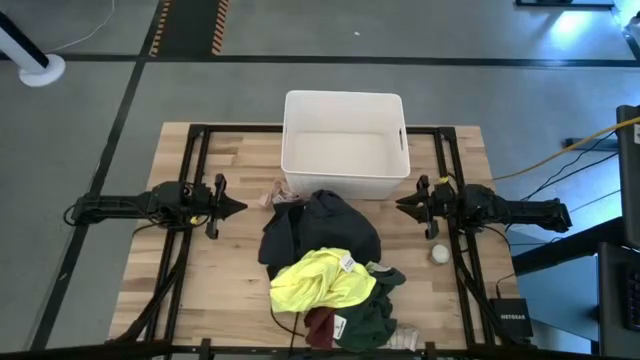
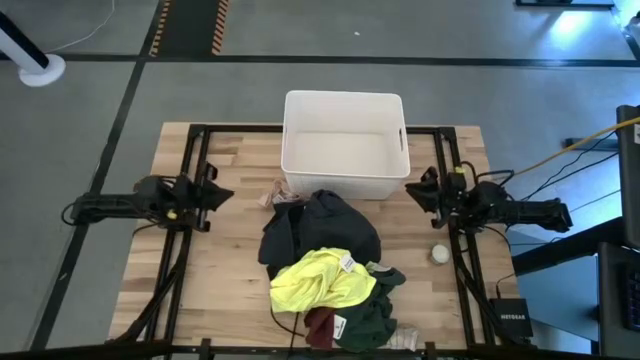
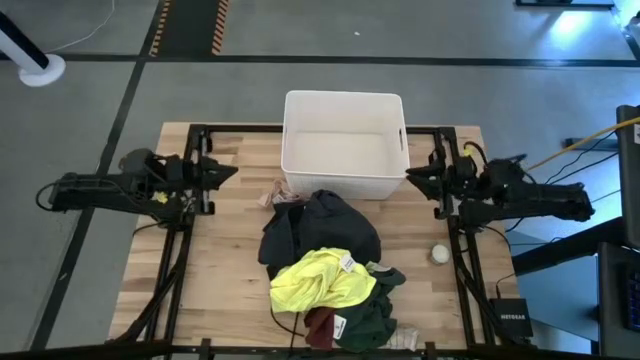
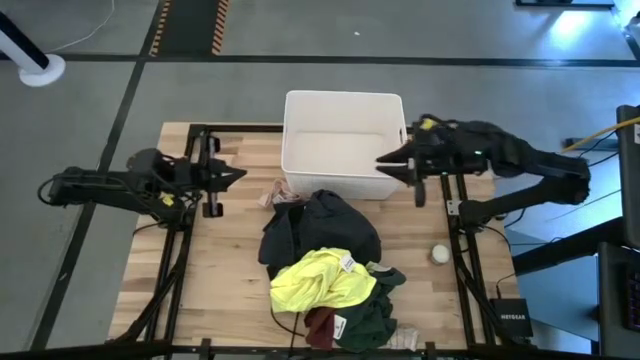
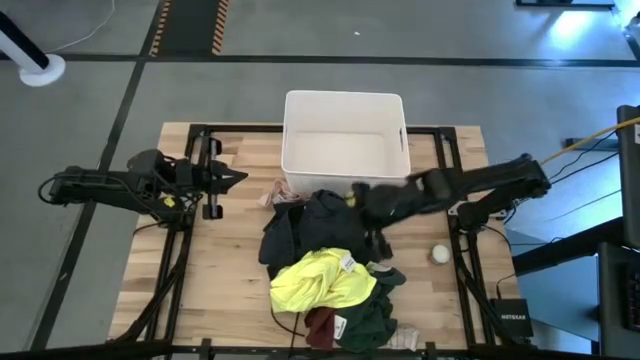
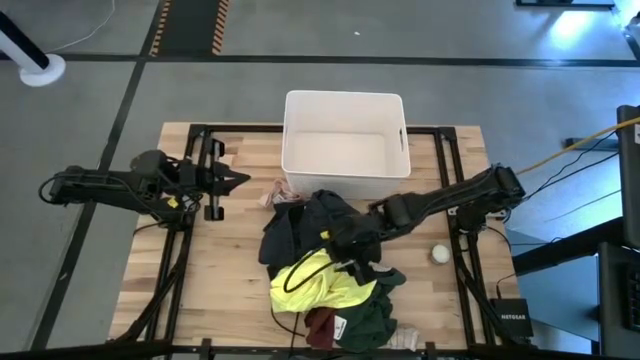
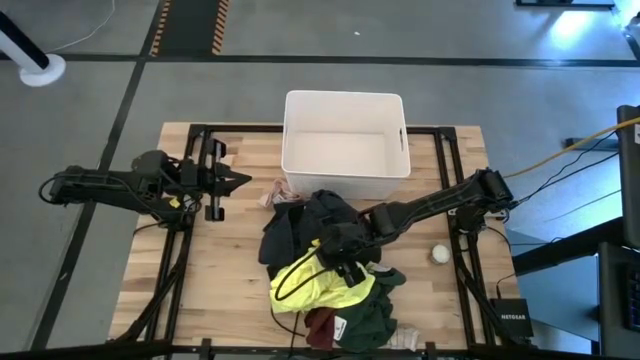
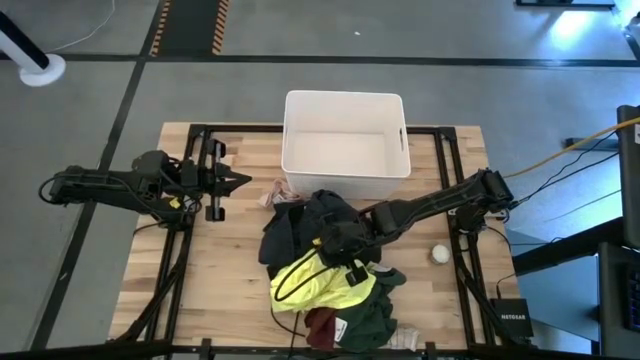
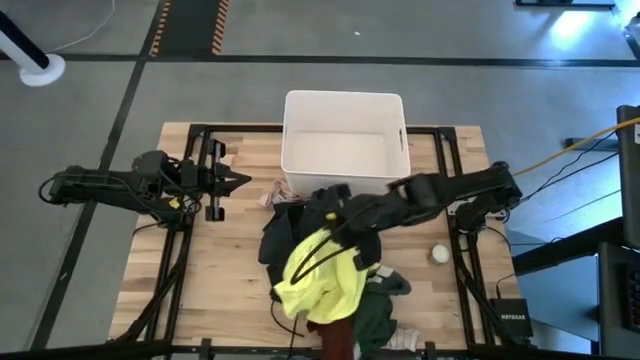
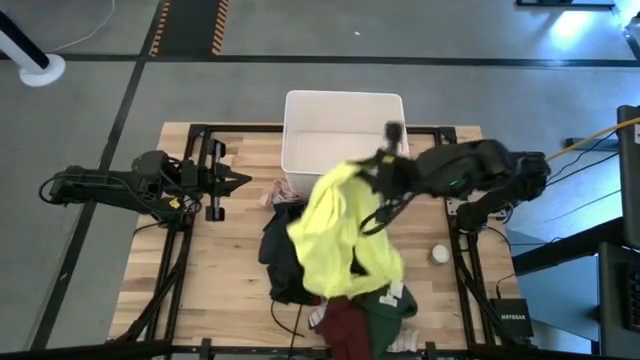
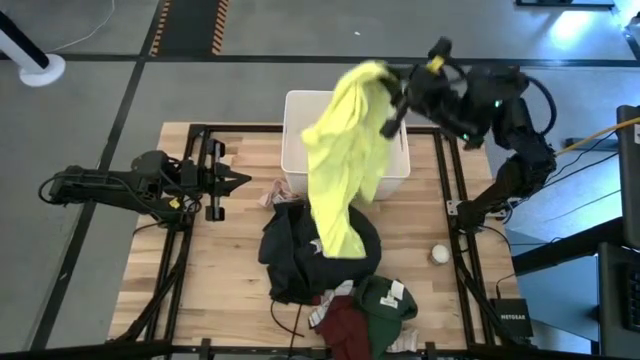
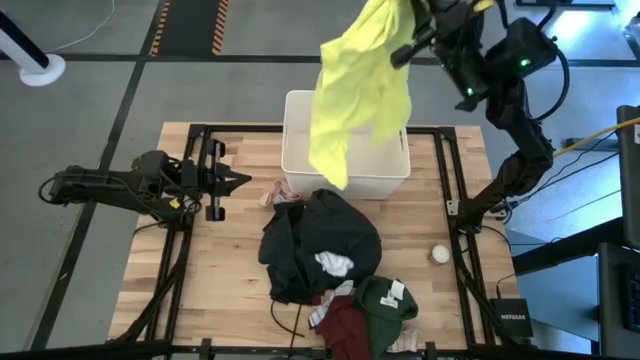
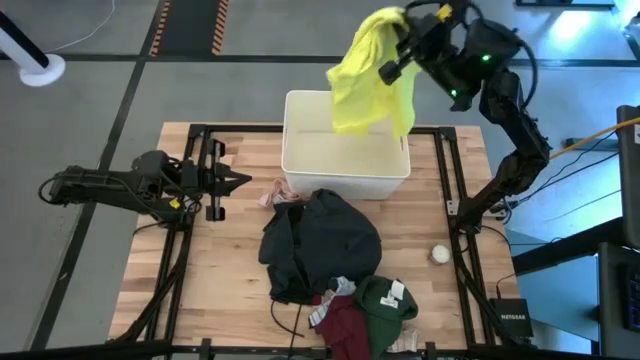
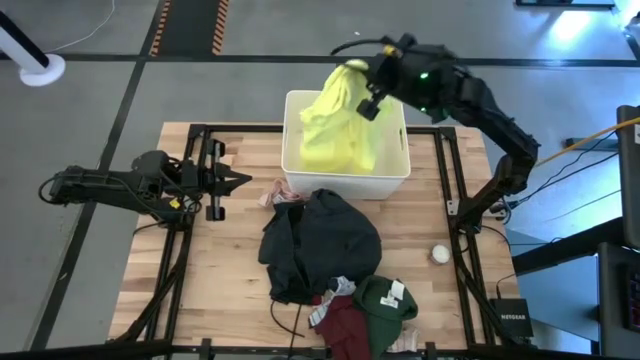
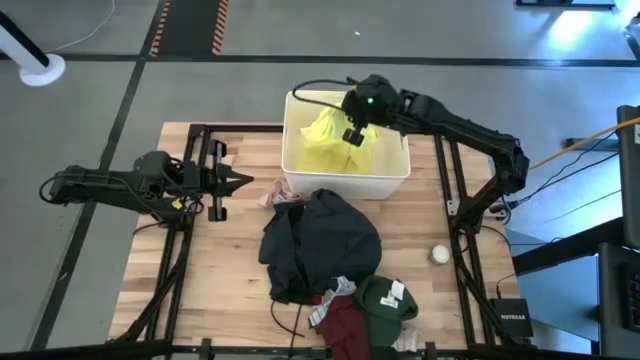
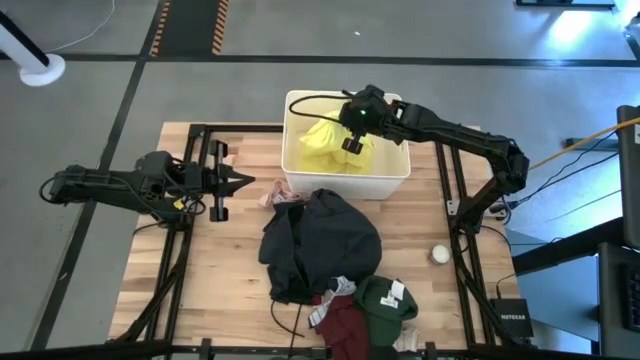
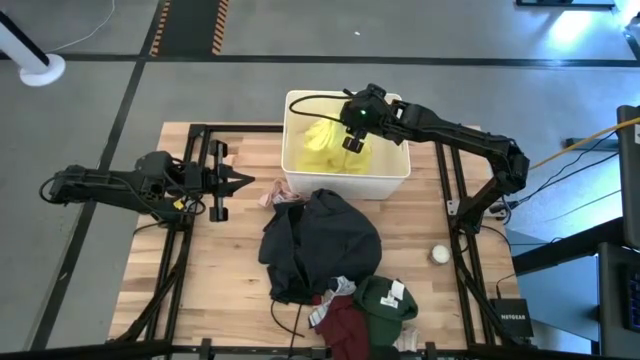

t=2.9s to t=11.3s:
Task: Sort clothes
Put the yellow shirt into the white bin

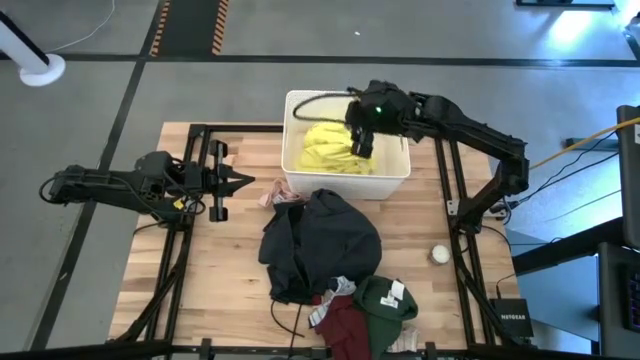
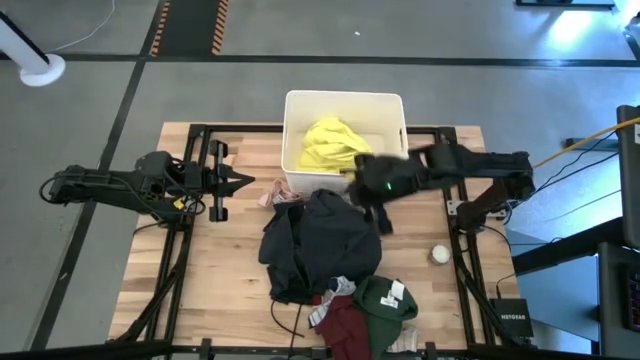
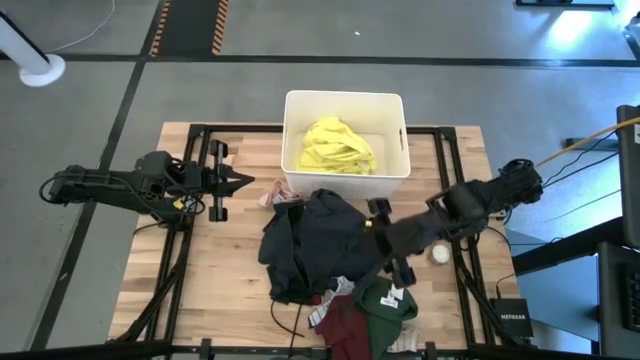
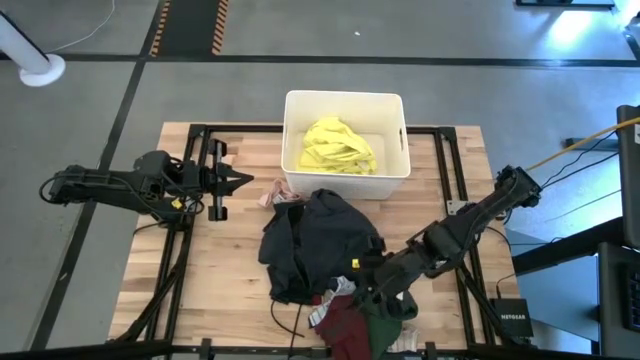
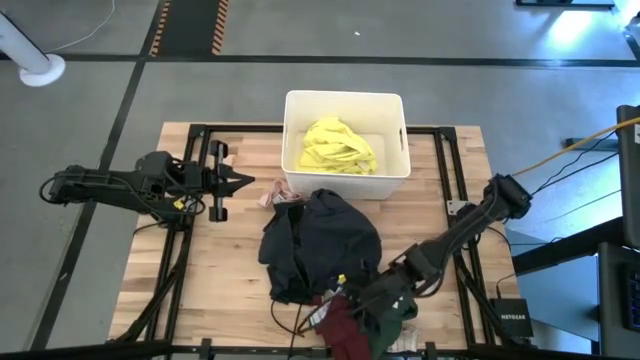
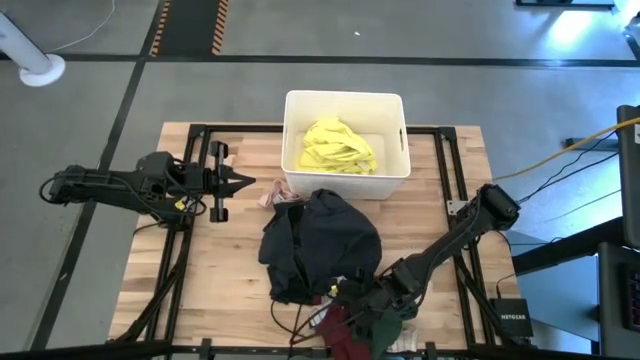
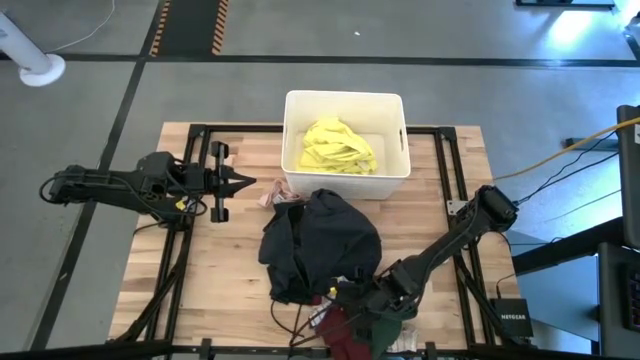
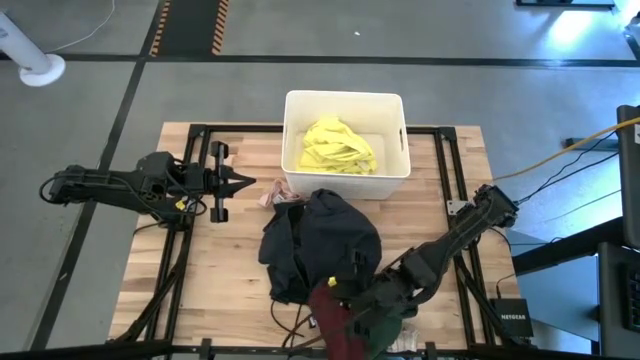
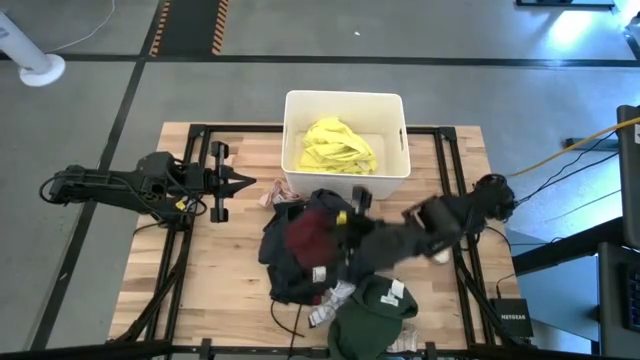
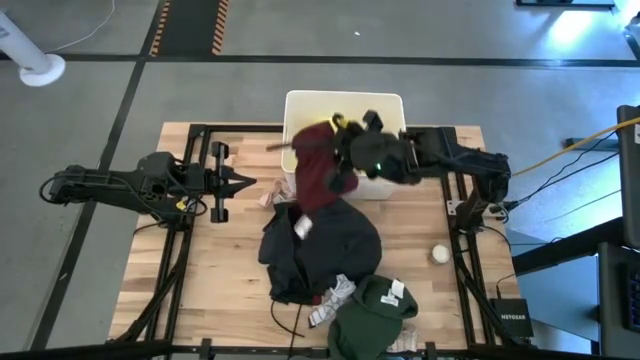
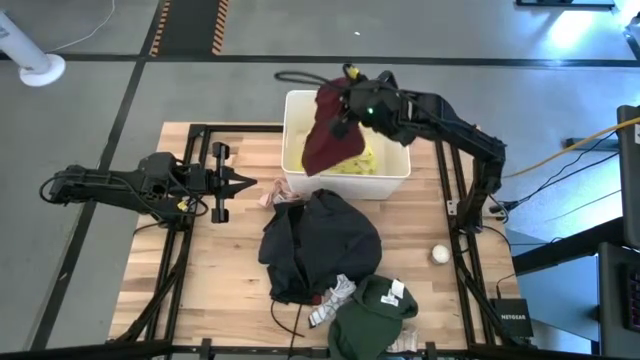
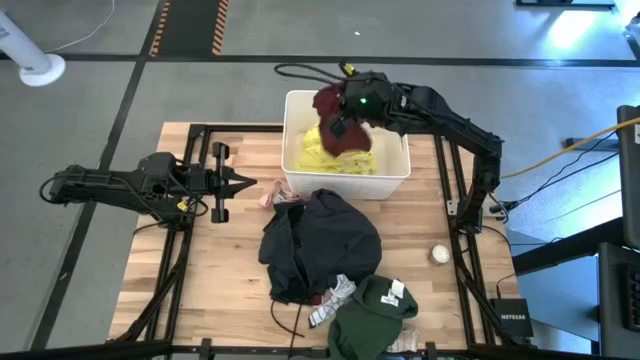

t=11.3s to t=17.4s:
Put the red garment into the white bin

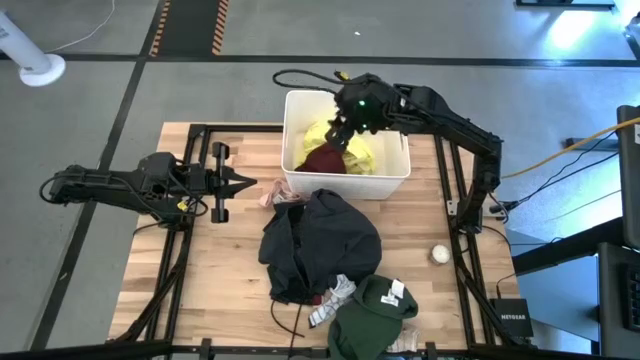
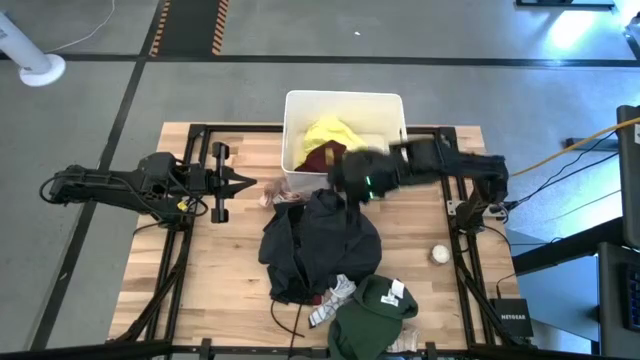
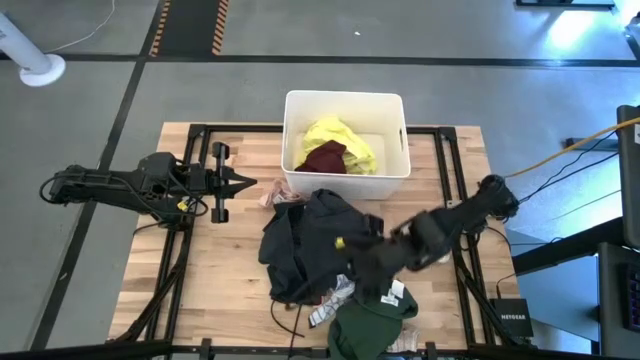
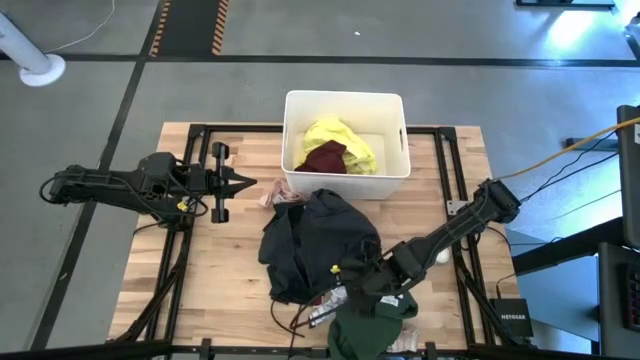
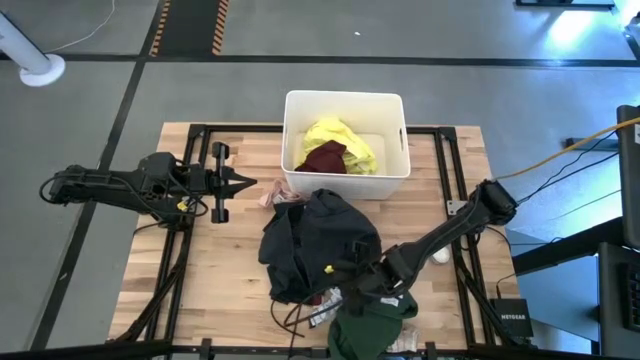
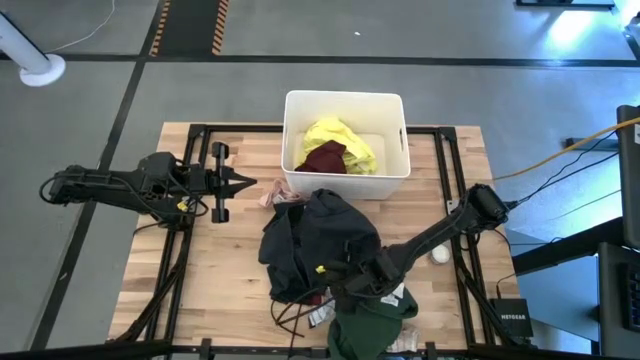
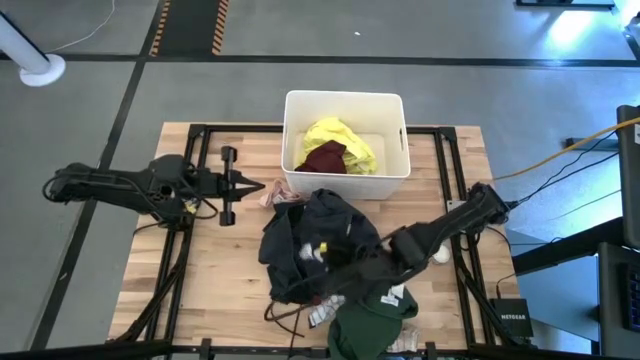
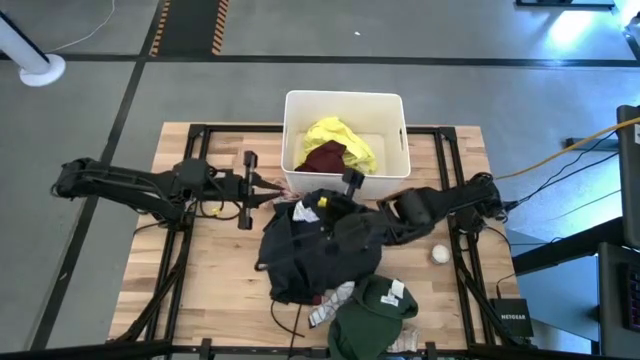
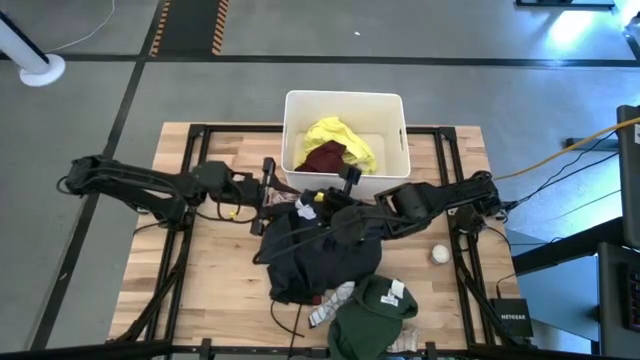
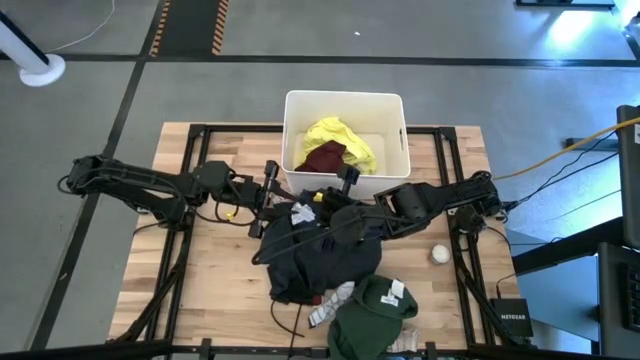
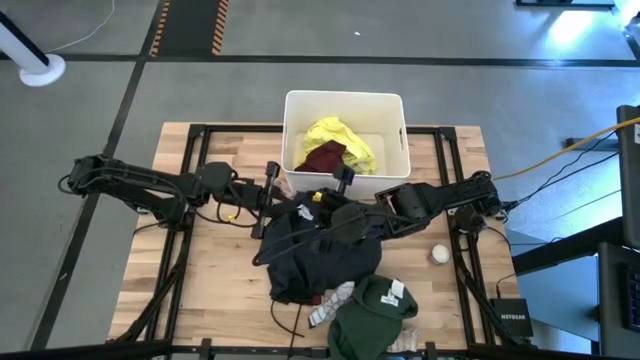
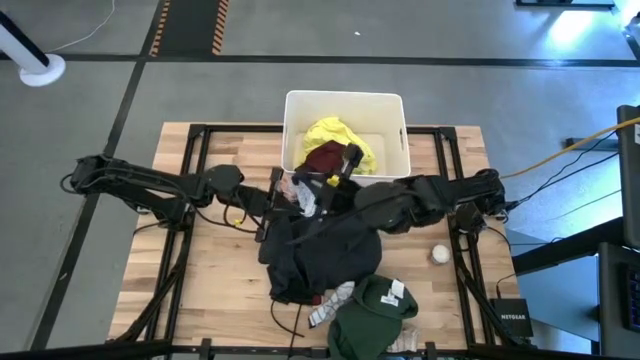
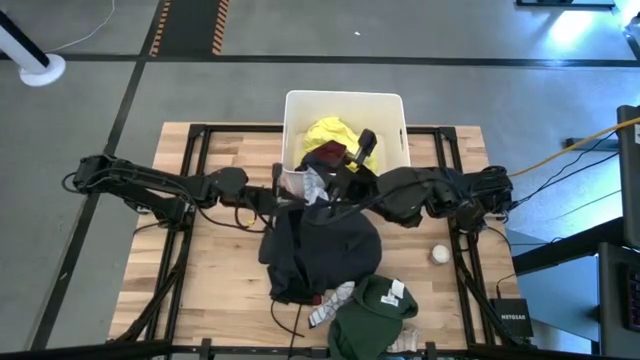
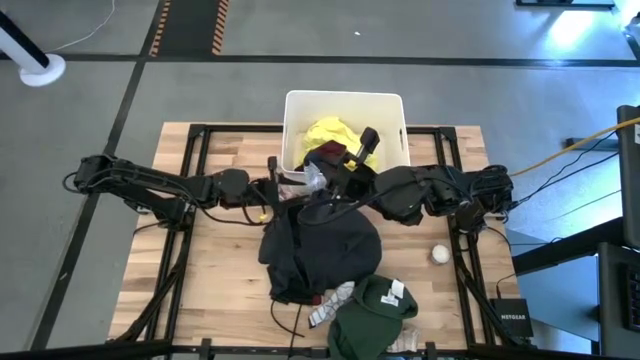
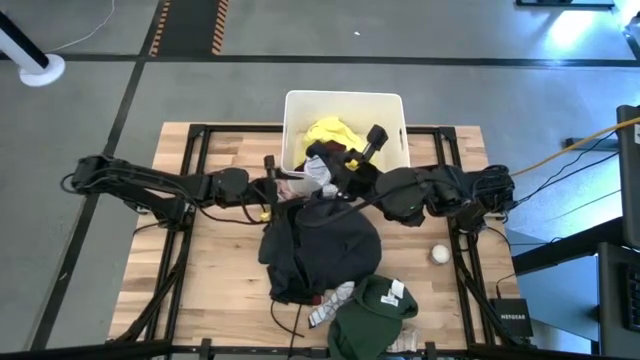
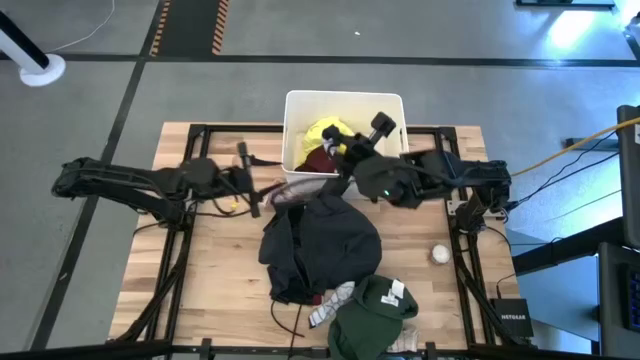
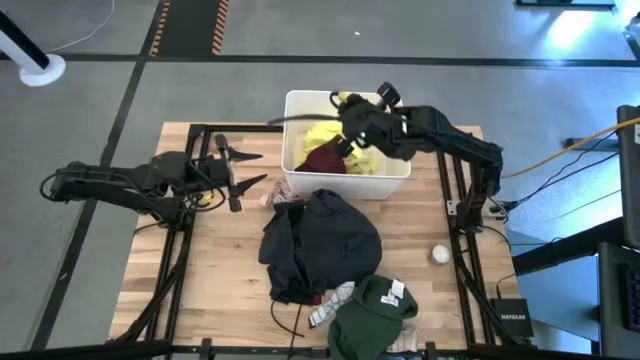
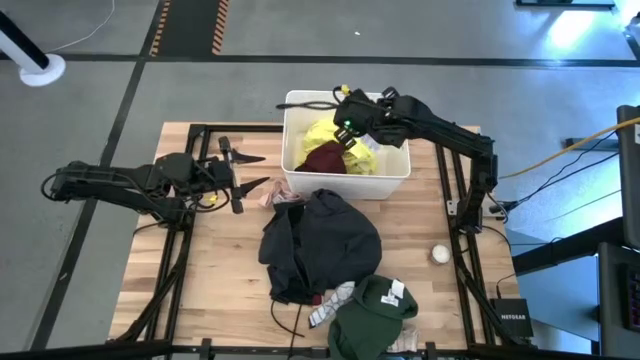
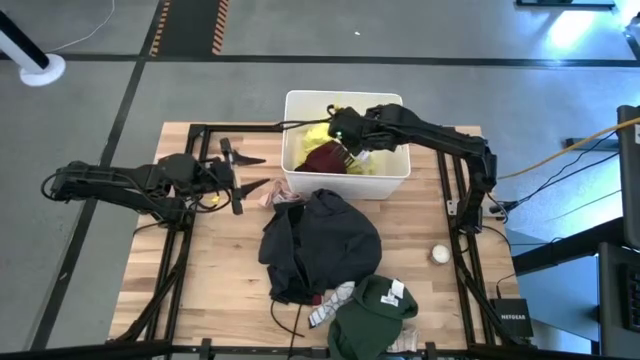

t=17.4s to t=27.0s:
Put the top blue and white sock into the white bin
